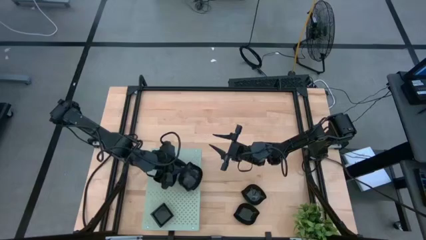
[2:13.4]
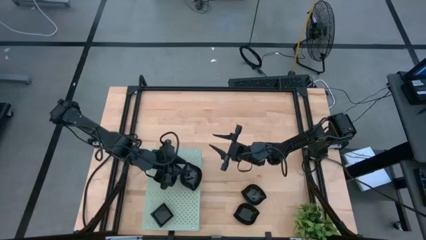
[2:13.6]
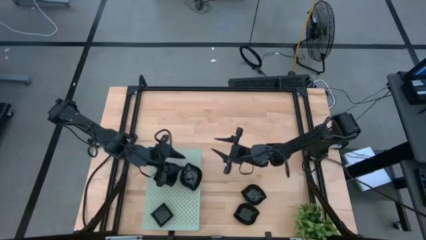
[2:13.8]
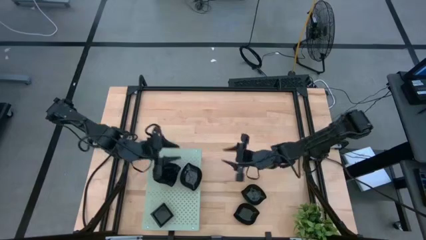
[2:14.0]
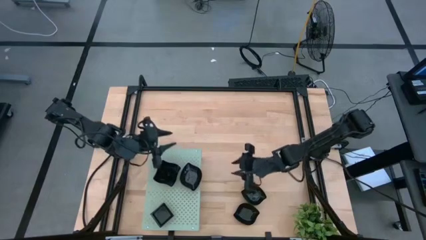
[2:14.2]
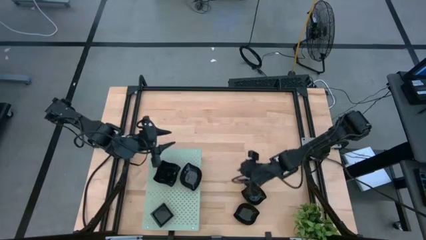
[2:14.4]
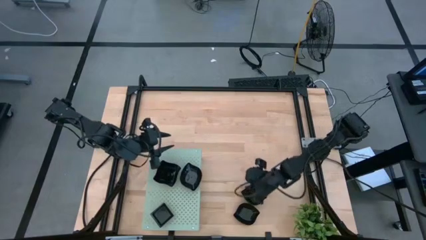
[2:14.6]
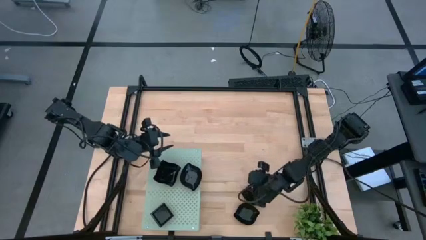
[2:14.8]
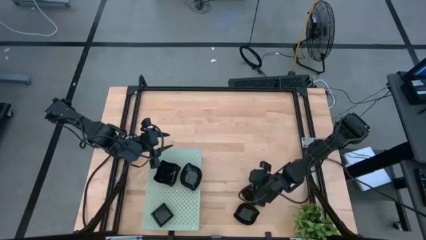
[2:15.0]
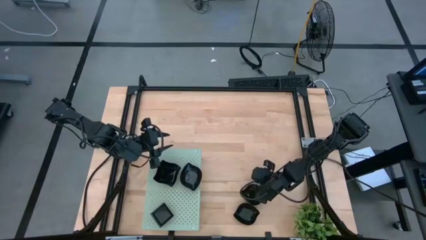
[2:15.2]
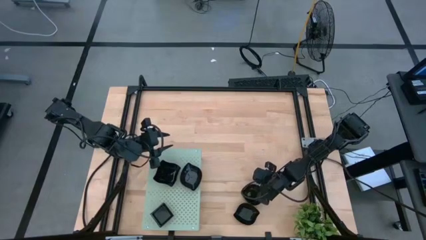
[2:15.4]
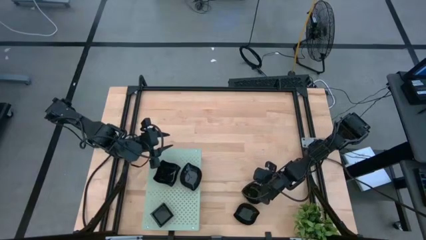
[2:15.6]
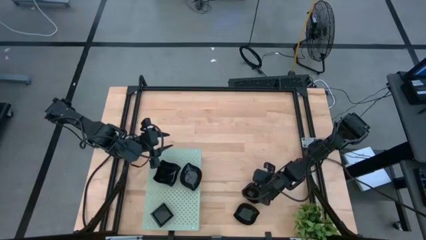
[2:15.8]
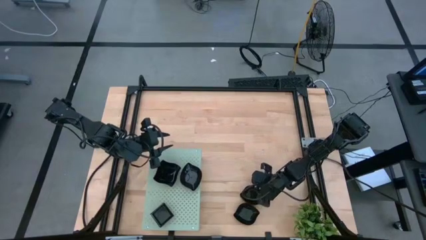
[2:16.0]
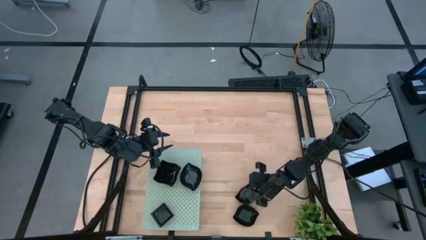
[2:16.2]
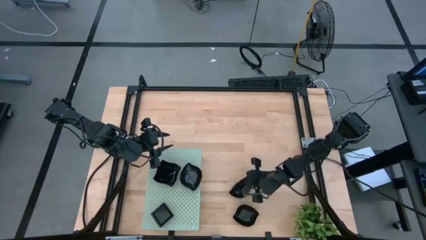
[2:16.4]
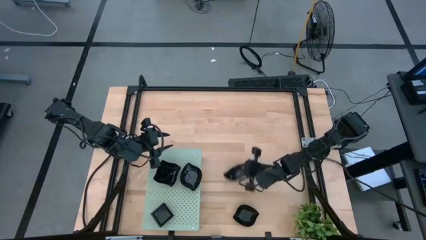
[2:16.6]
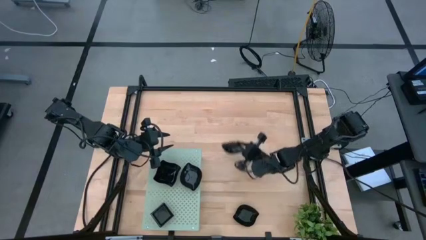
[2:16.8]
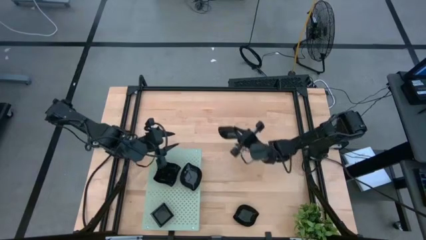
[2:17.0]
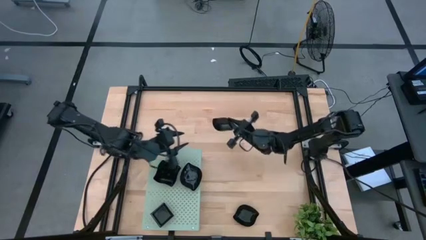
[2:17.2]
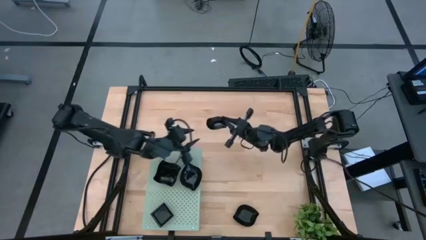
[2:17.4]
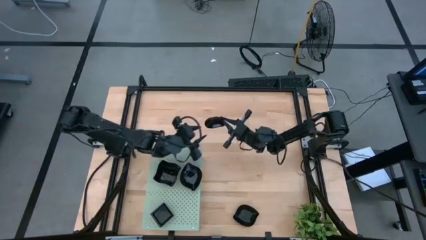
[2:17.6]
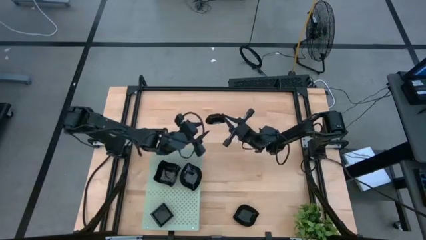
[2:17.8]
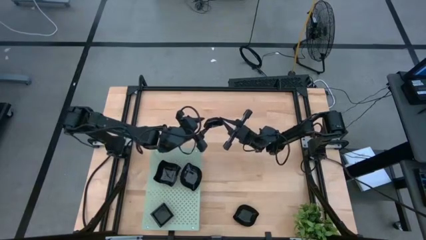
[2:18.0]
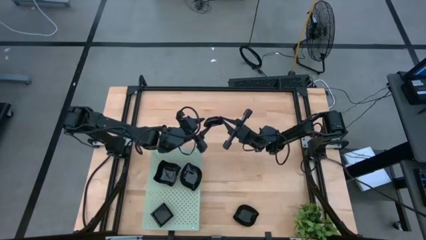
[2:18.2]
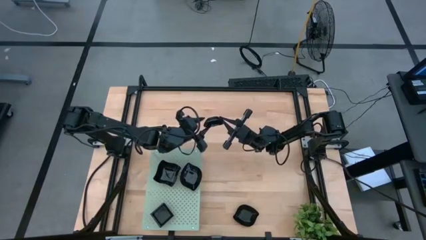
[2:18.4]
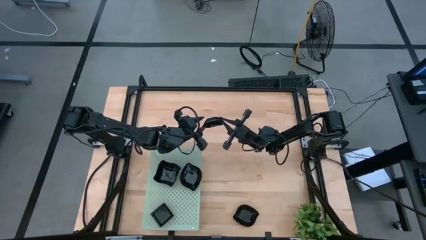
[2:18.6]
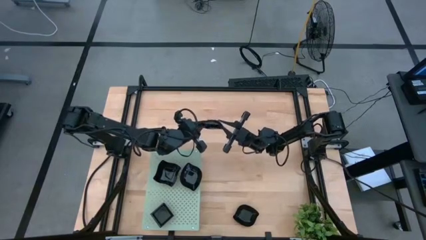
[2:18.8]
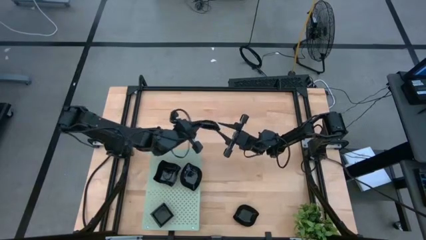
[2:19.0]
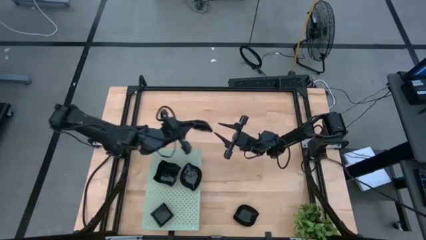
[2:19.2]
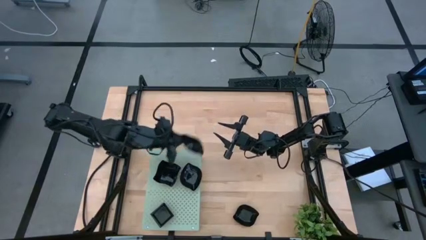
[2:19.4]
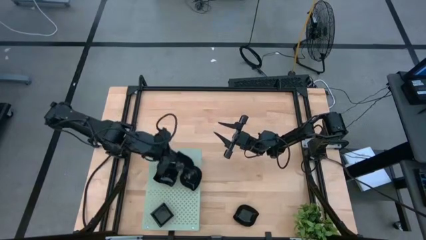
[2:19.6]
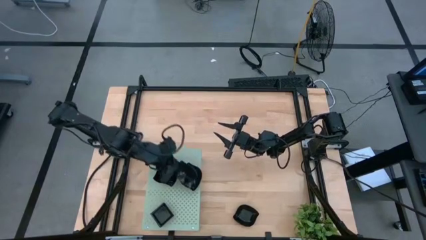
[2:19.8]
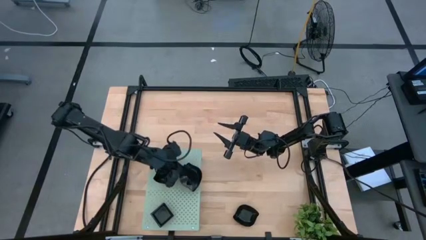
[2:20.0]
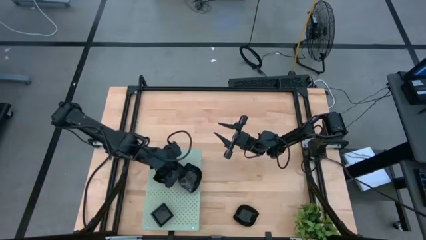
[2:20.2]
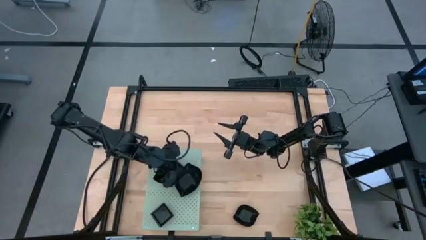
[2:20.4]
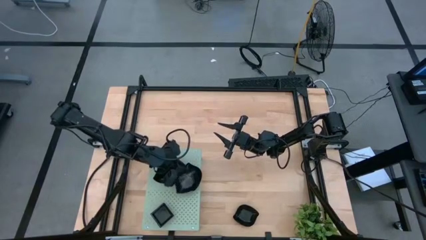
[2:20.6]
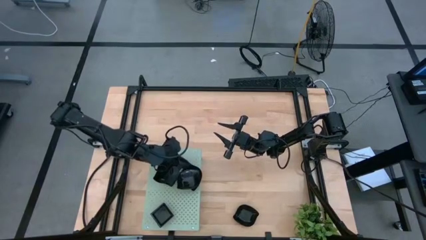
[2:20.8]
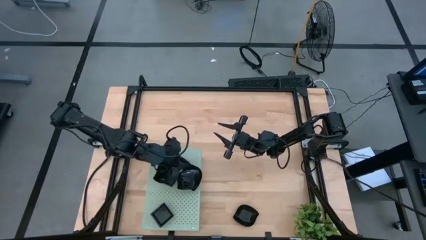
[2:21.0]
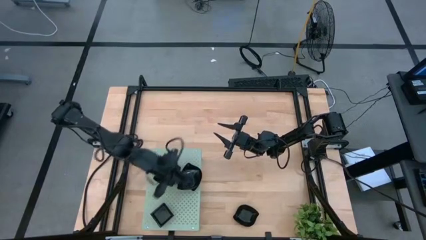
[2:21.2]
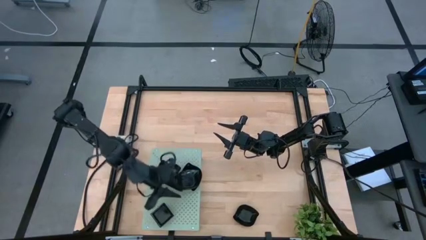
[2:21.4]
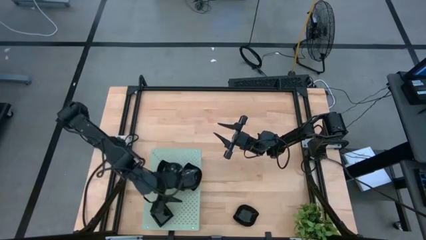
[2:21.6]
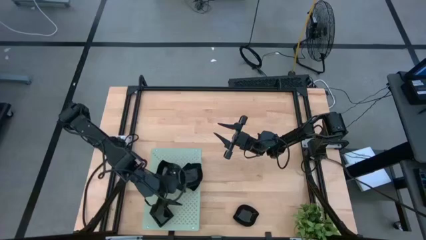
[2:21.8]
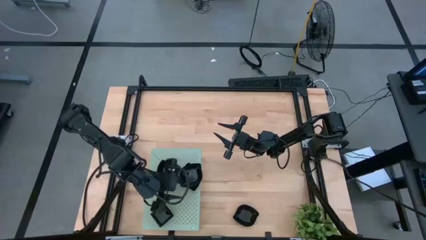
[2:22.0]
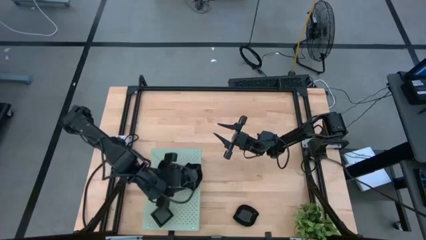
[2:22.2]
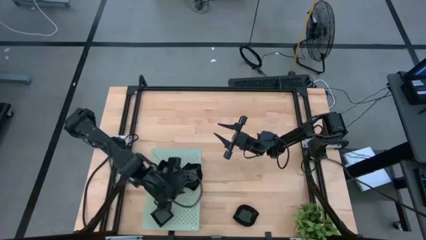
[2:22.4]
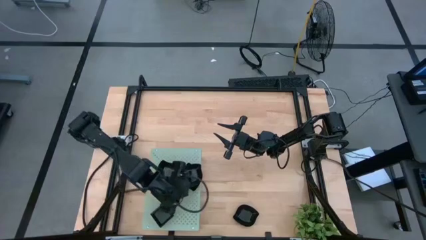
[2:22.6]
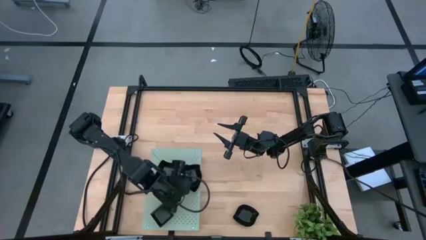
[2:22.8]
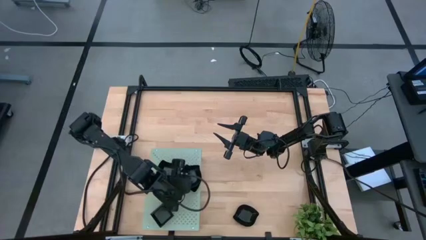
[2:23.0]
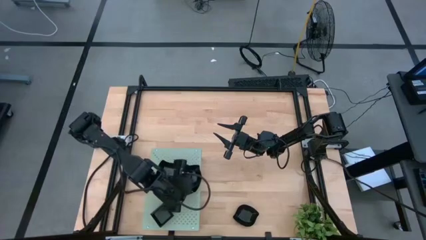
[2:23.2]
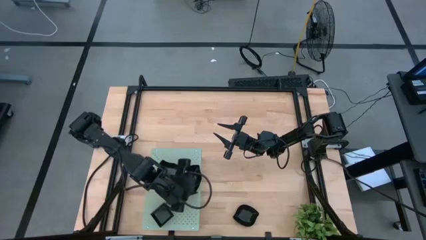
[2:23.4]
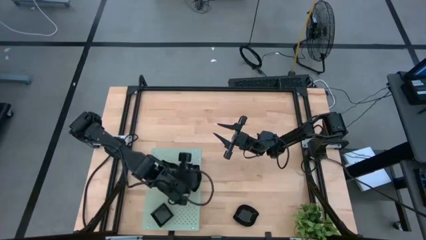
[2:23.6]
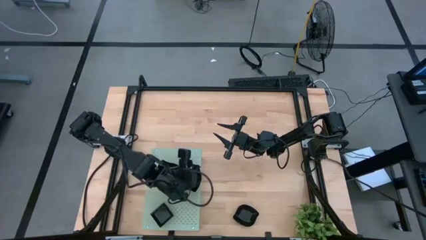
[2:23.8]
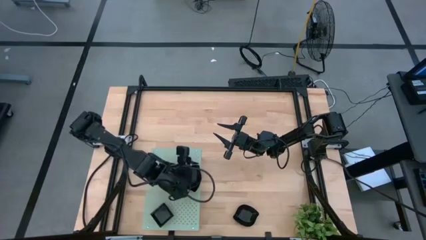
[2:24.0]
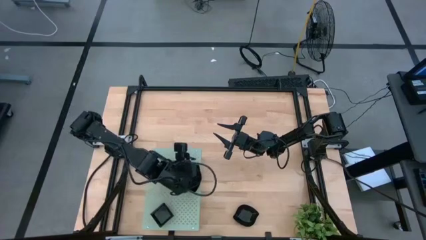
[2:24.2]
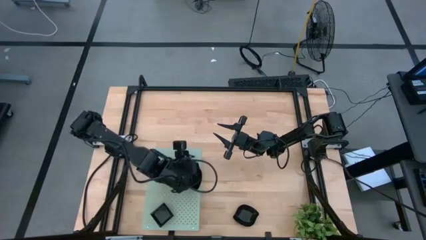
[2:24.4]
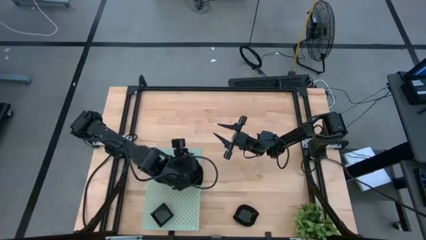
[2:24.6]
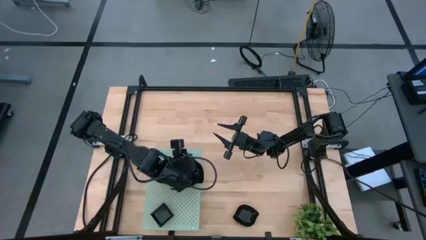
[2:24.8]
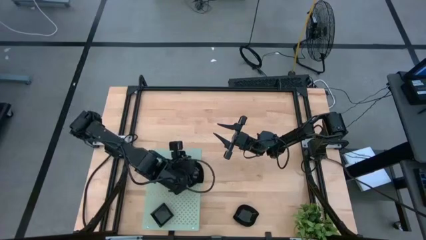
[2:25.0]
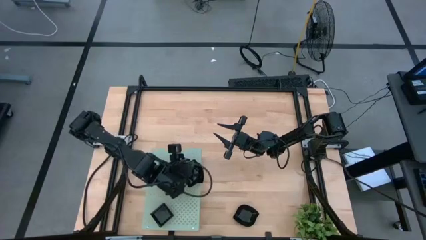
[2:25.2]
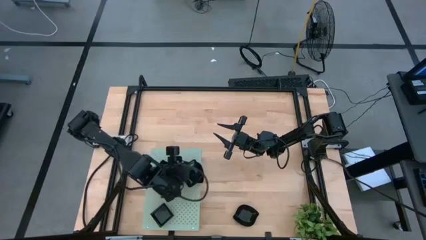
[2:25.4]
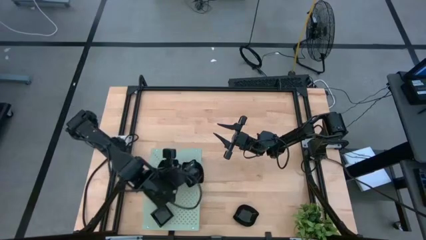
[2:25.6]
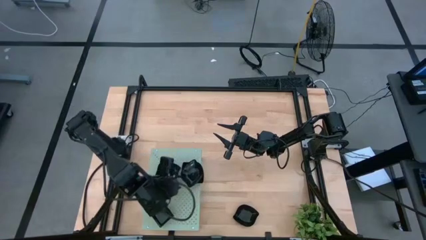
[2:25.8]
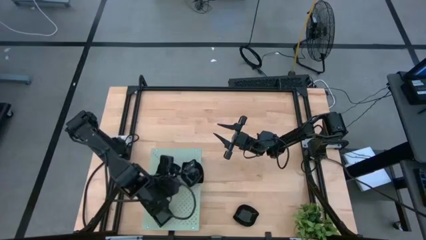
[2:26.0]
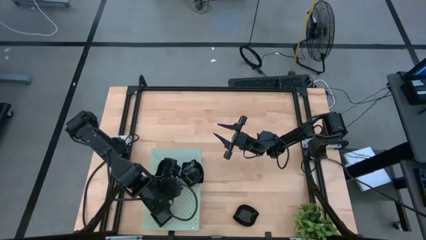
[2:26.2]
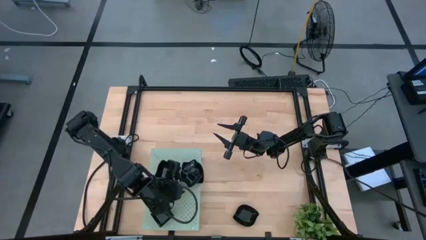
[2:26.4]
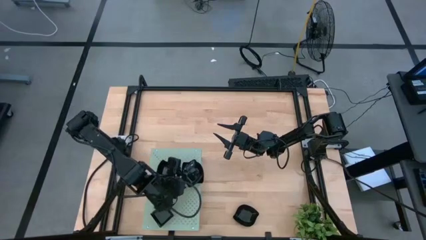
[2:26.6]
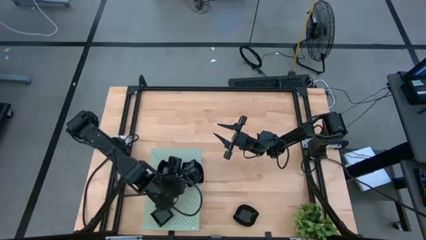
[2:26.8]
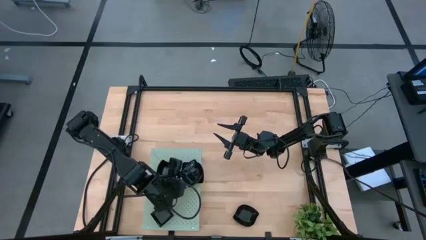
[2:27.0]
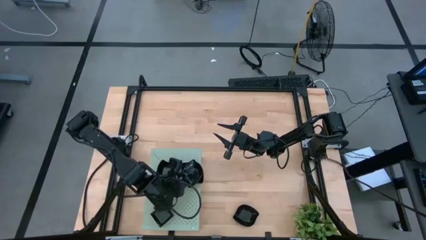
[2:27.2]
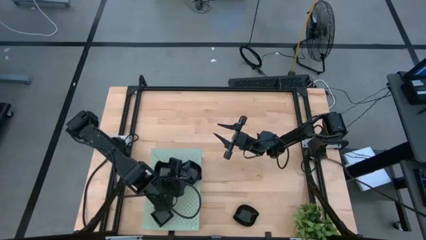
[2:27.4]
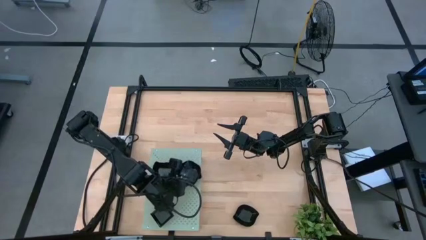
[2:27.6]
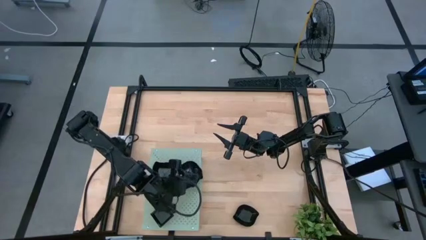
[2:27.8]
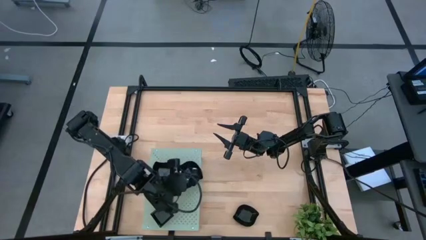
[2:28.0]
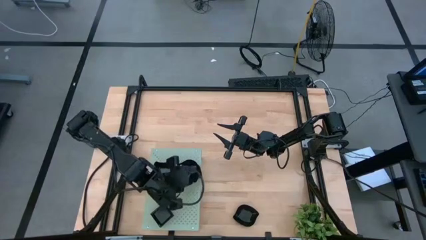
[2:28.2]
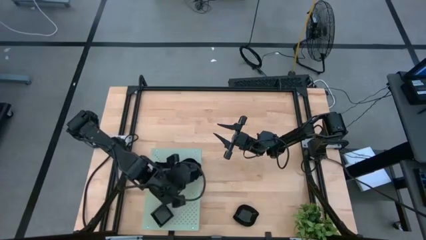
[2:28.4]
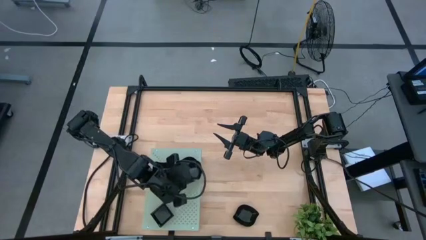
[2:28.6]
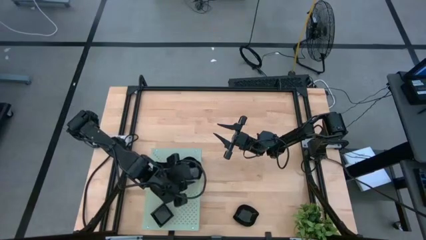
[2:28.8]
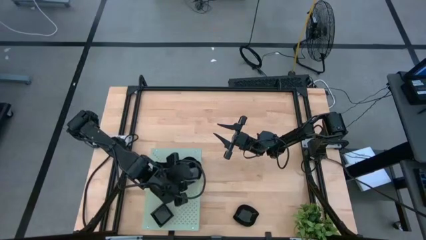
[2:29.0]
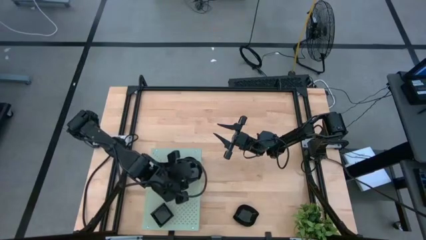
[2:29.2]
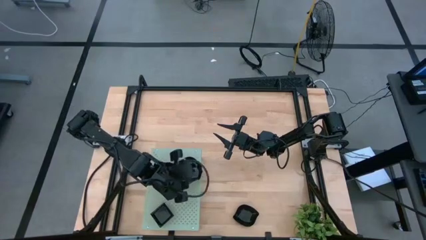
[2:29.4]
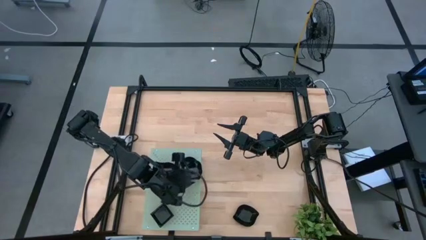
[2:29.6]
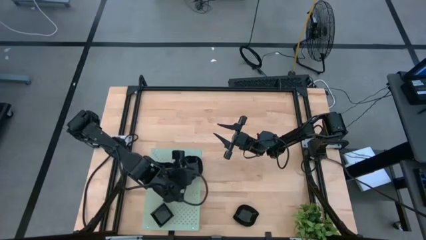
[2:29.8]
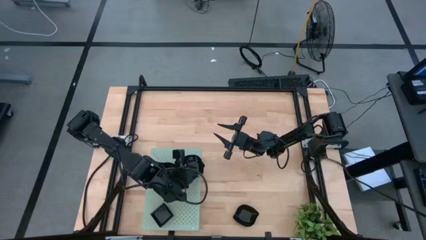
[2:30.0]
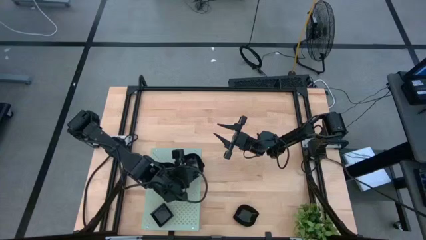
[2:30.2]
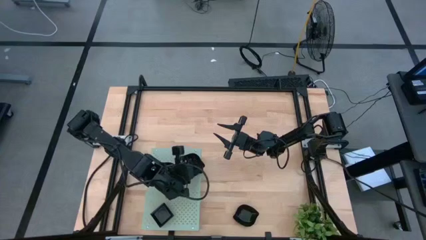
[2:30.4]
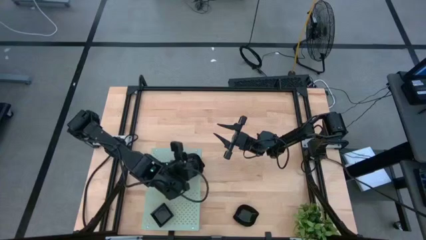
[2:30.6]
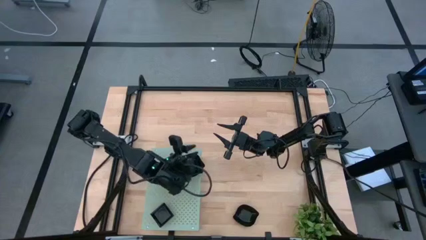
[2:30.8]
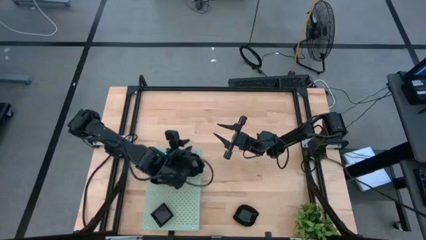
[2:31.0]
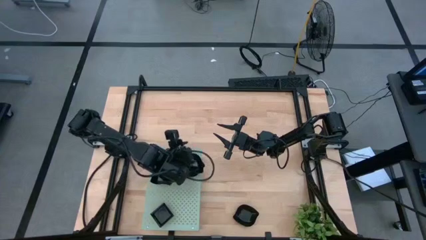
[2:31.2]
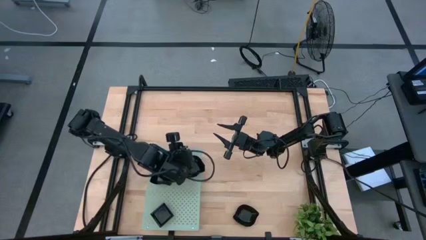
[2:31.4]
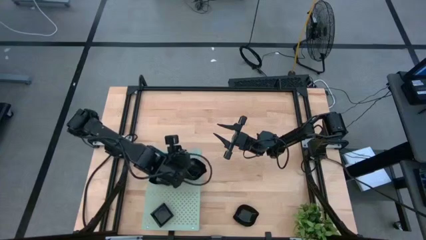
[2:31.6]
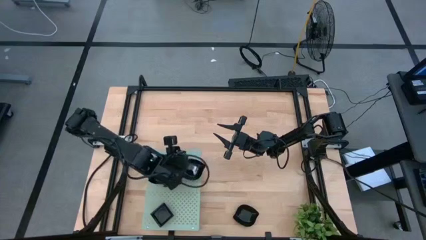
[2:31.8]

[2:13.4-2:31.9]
Task: Pick & Place Mini shaped plates
Stack the leaf shaped plate on top of the other leaf shaped plates on the shelf
